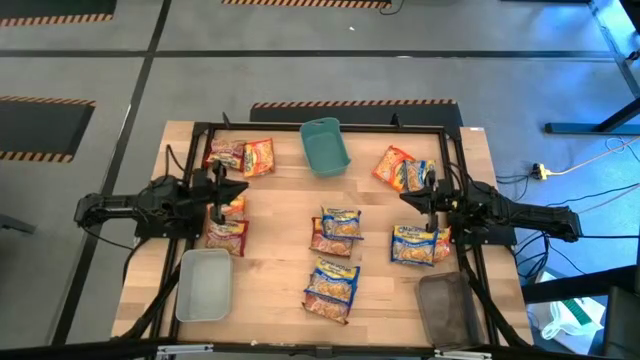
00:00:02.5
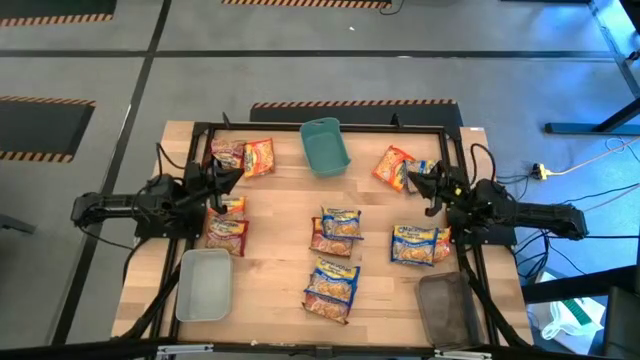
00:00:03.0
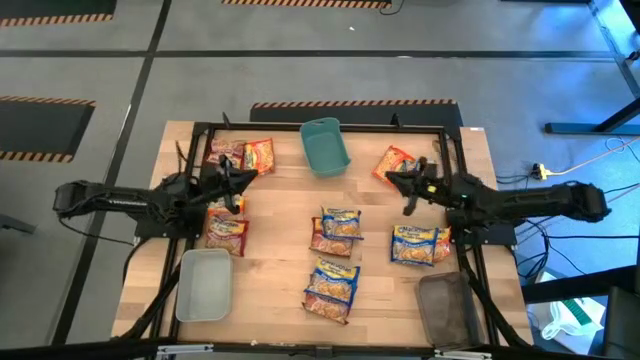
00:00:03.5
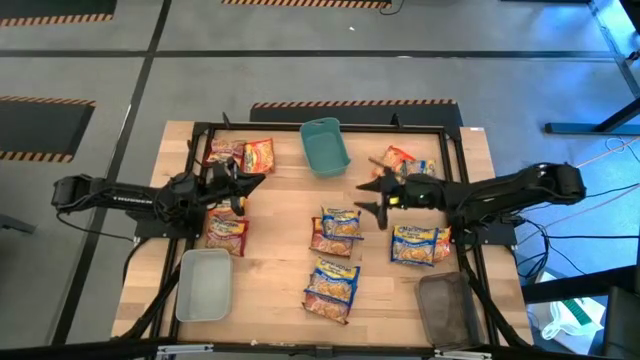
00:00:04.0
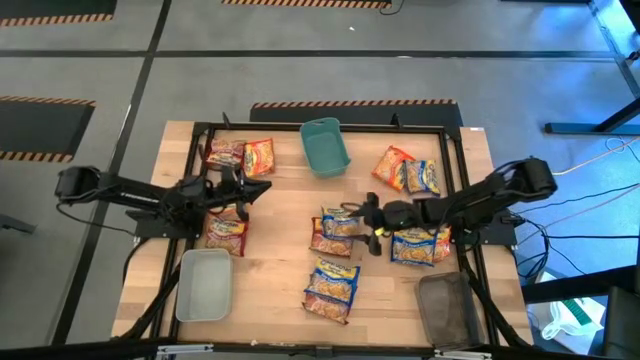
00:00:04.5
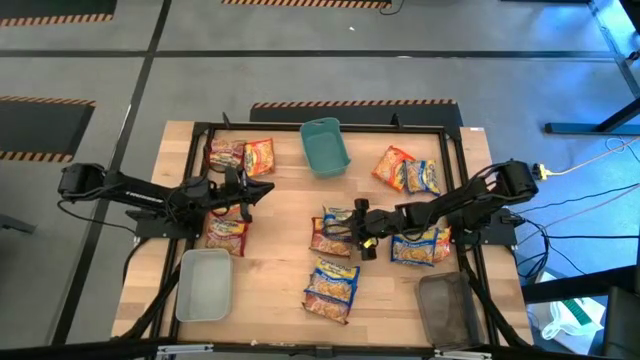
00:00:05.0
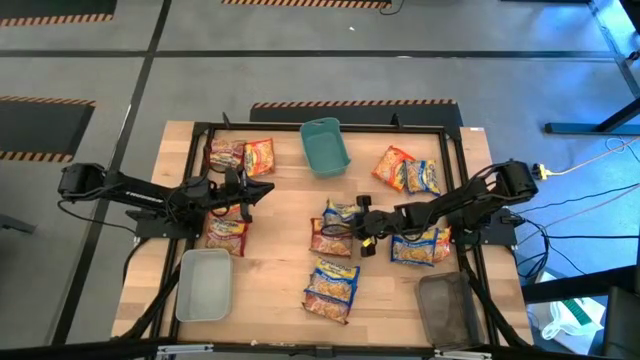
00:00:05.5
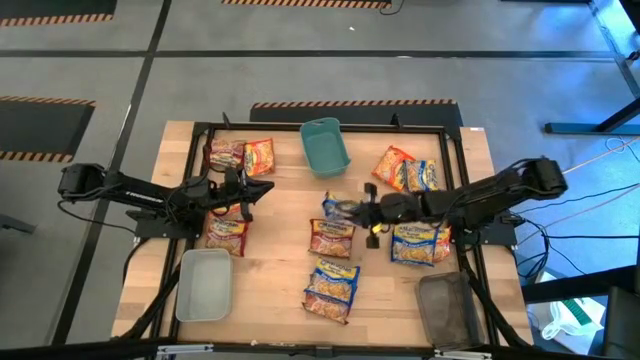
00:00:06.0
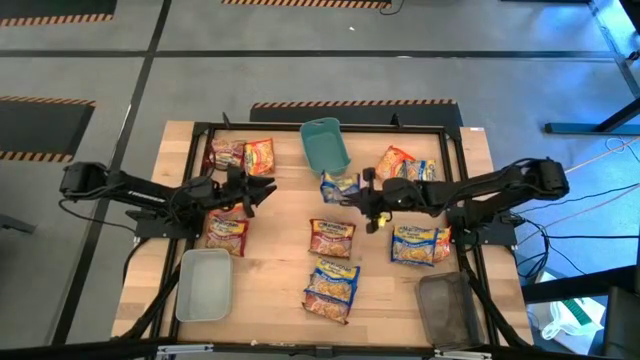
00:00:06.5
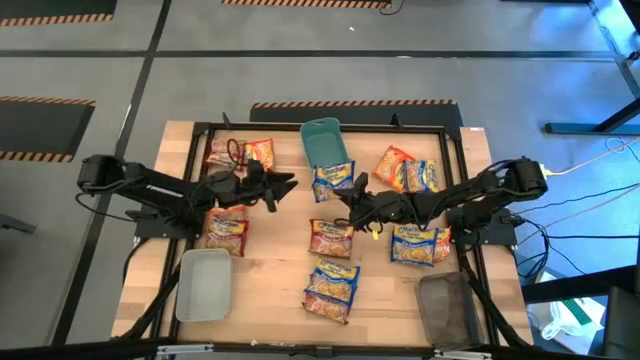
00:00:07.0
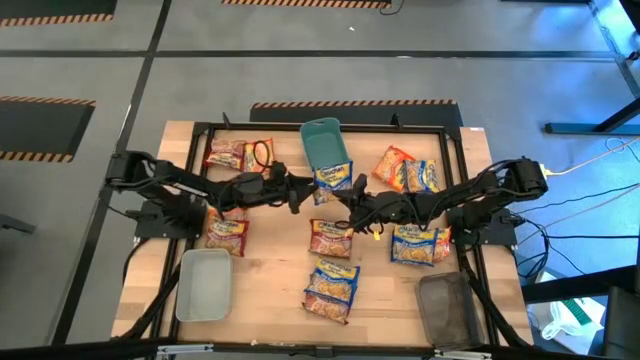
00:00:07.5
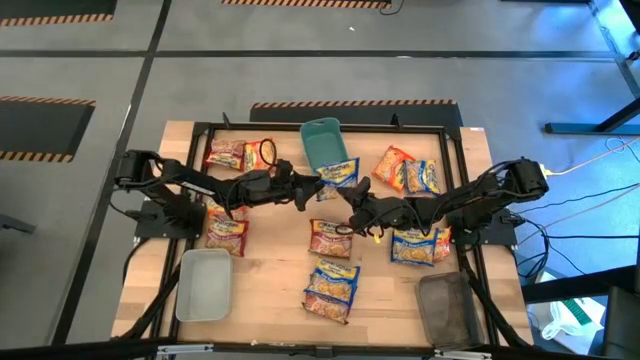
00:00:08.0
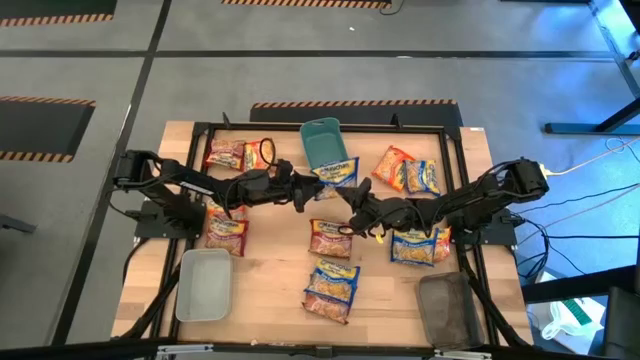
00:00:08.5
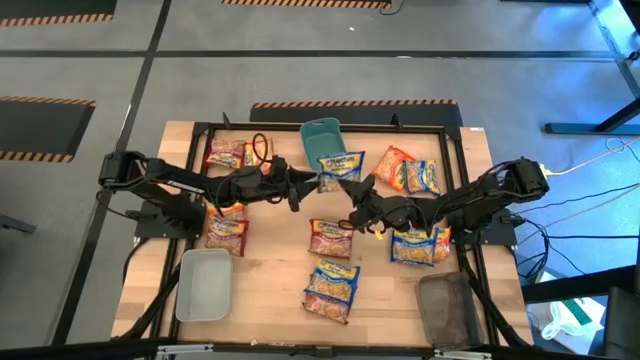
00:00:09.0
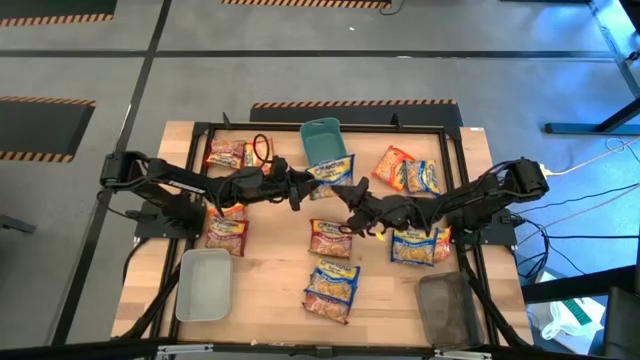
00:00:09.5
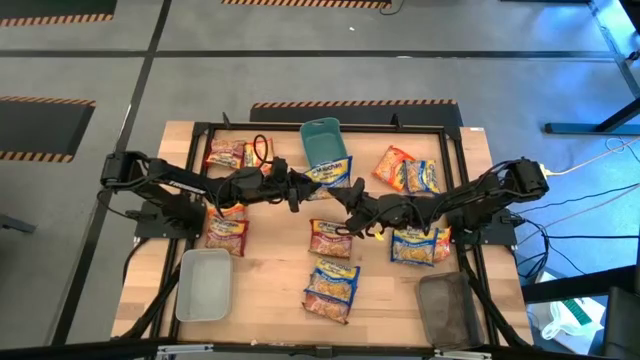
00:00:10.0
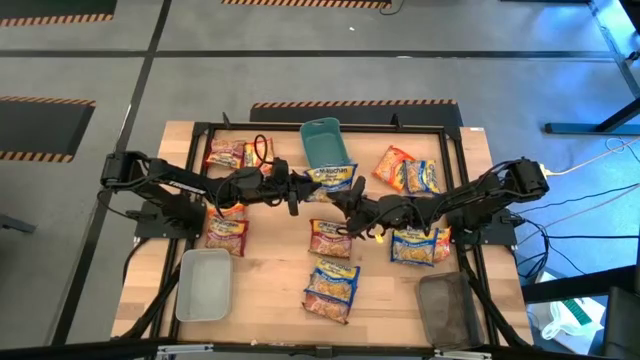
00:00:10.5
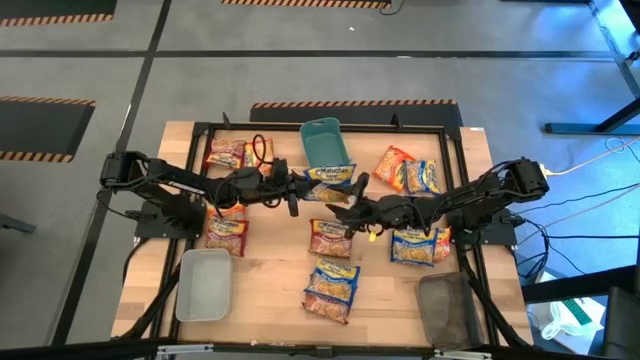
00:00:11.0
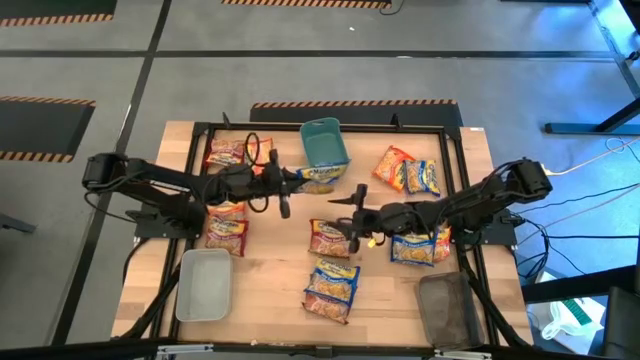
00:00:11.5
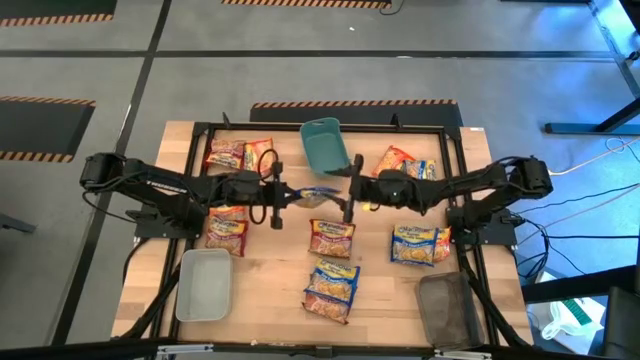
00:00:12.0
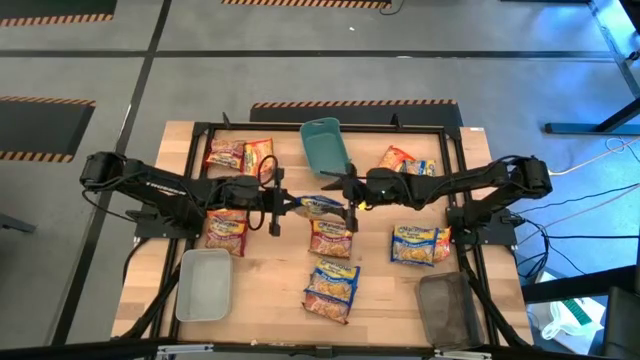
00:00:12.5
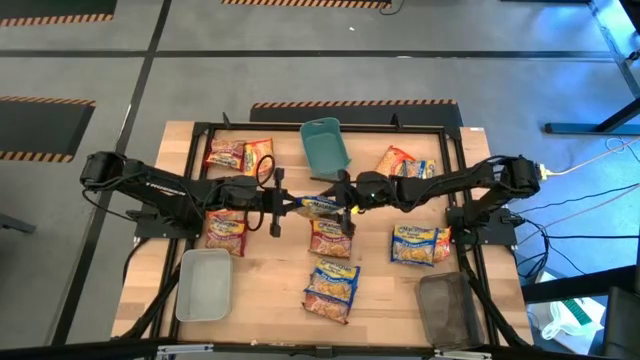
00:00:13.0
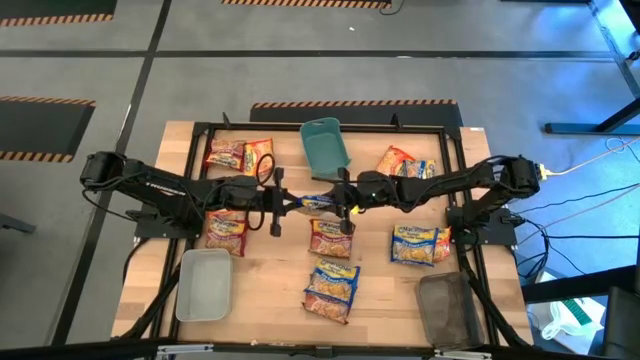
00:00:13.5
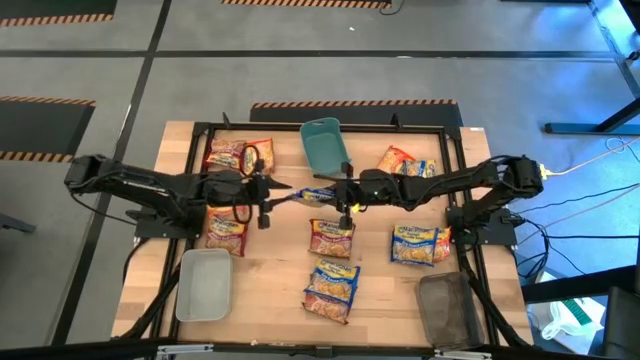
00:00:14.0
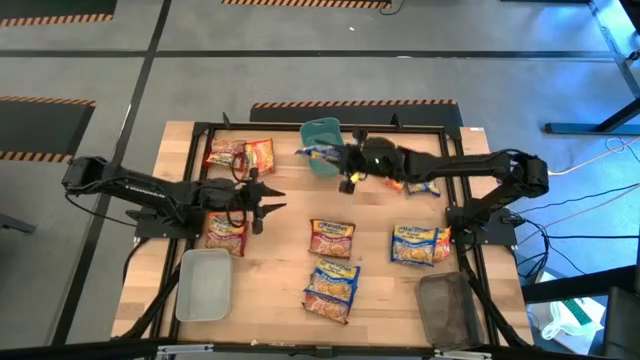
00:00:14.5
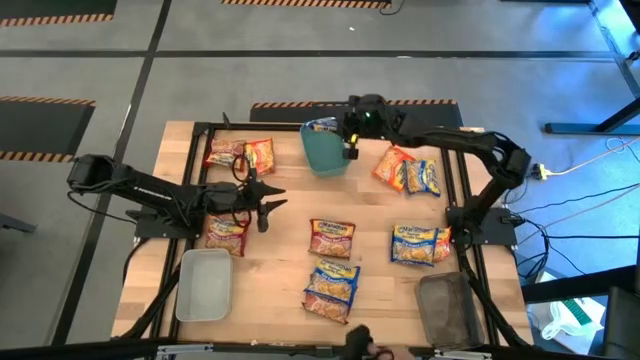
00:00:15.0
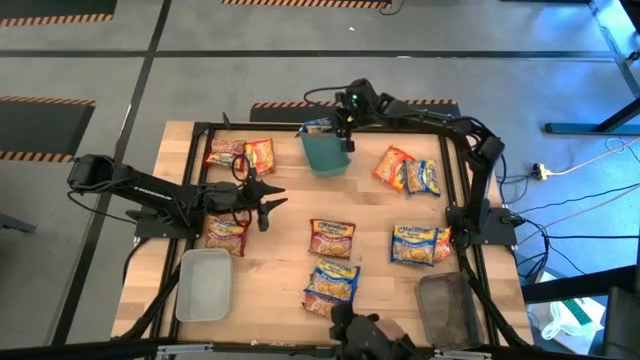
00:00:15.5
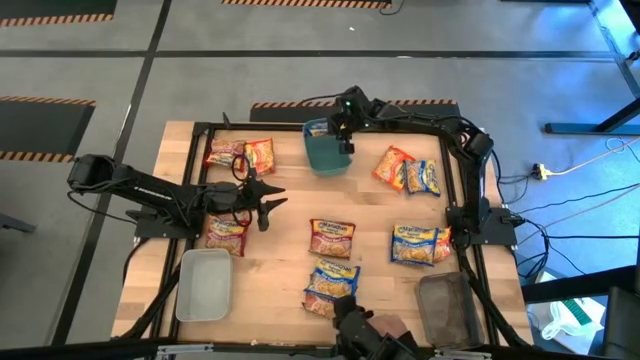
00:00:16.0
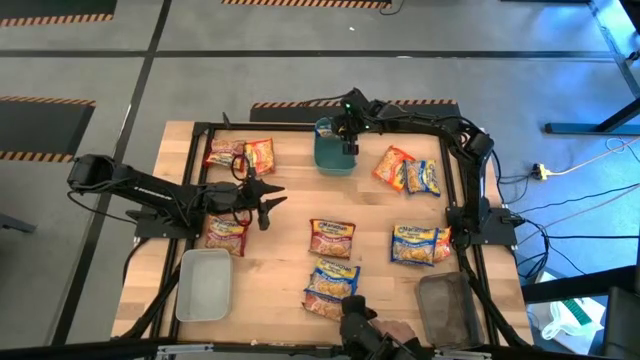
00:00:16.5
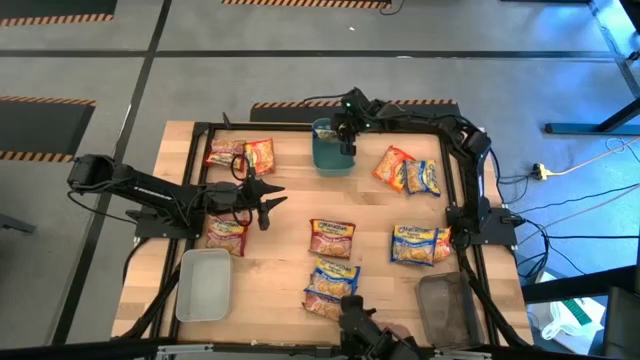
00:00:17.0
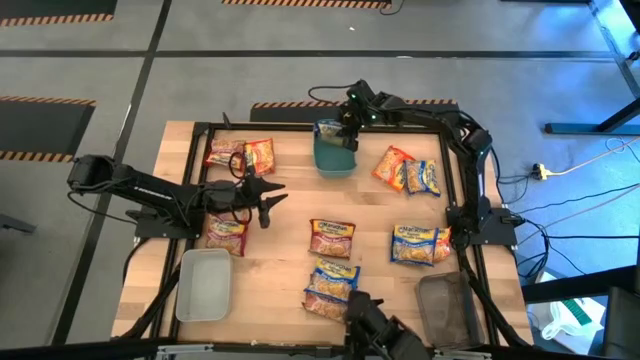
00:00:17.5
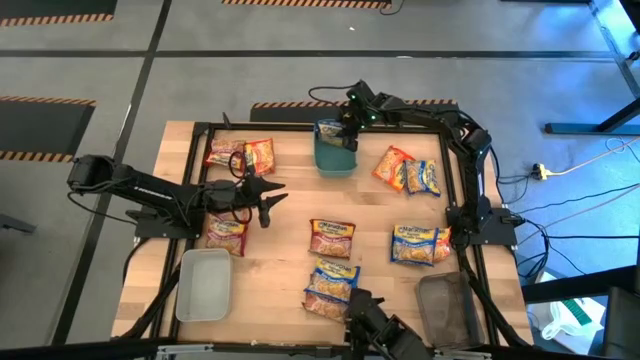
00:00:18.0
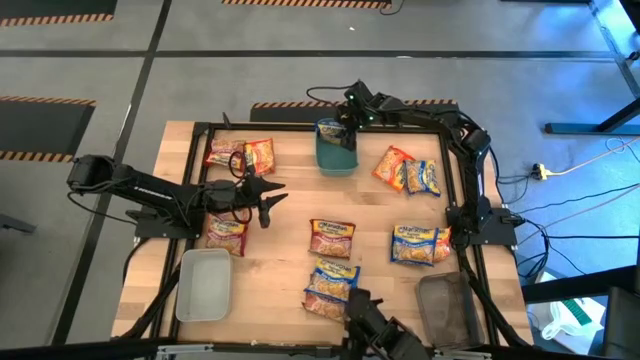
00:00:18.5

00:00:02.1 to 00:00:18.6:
Task: Sort Maruchan noodles
Put the blue noodle pack into the green bin

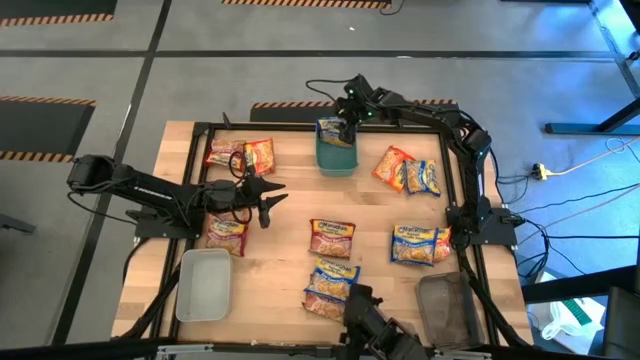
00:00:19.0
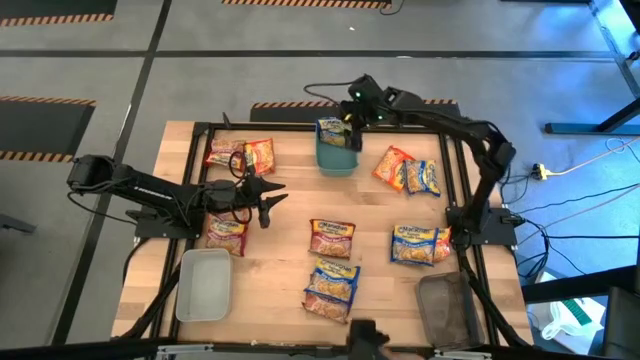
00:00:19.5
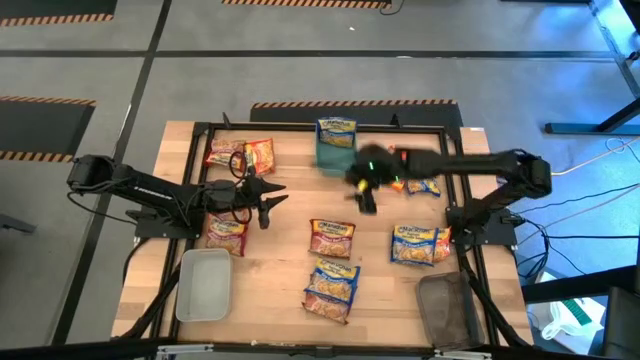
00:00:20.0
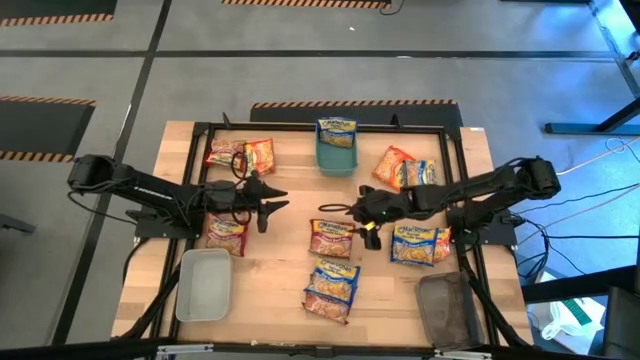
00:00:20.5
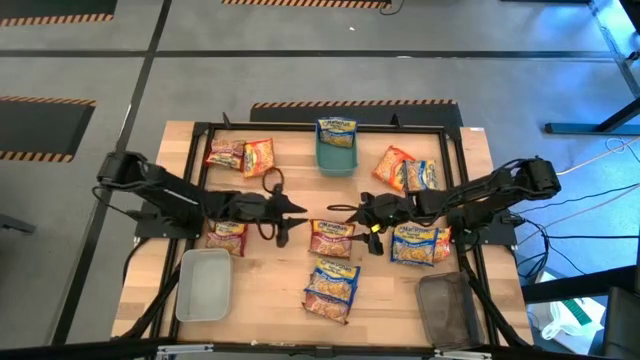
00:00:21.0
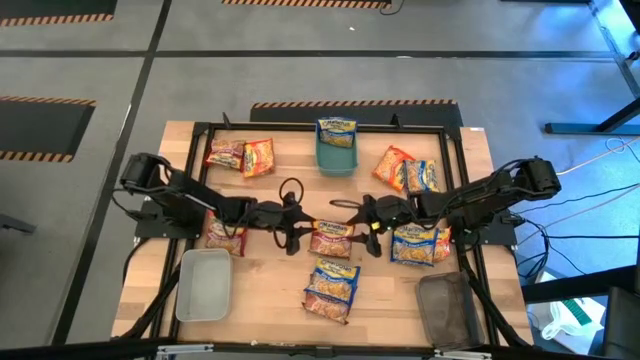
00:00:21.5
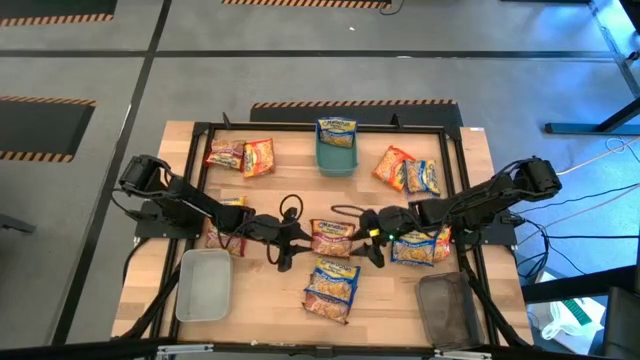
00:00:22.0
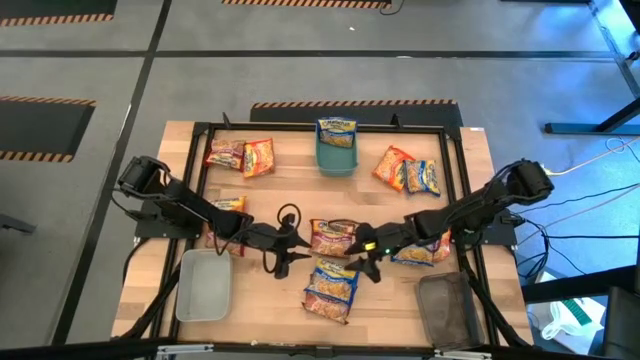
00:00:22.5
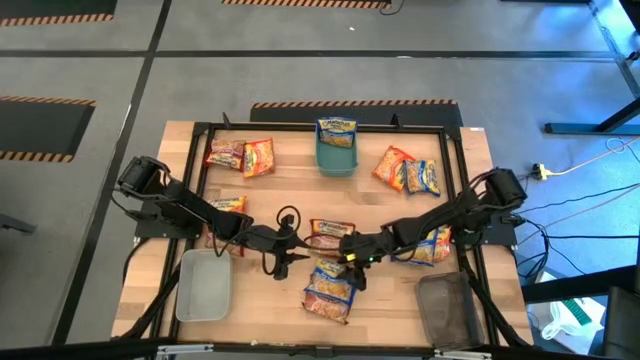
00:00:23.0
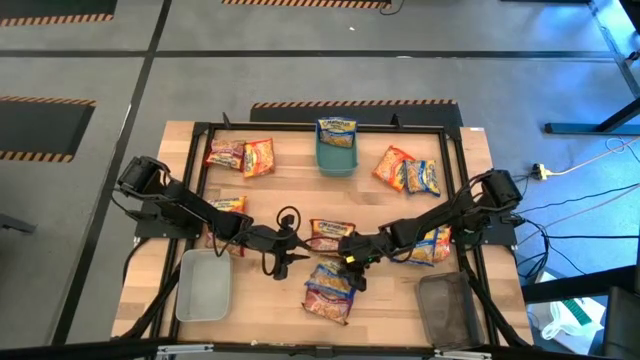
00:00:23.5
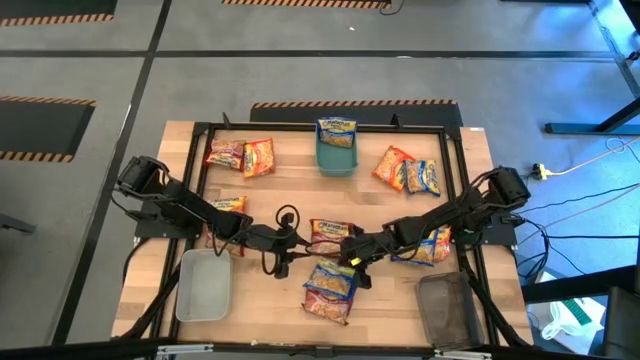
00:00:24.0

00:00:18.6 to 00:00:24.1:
Put the blue noodle pack into the green bin
